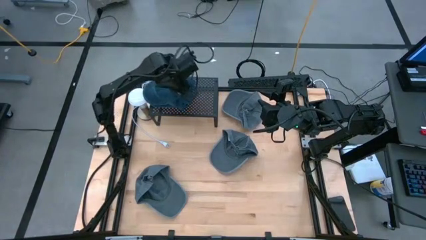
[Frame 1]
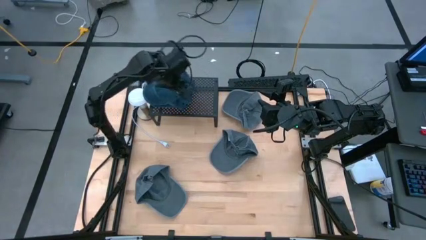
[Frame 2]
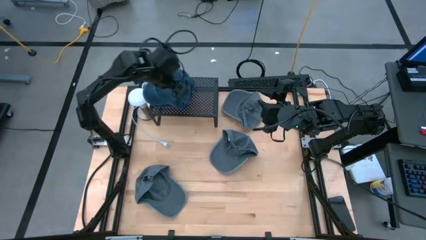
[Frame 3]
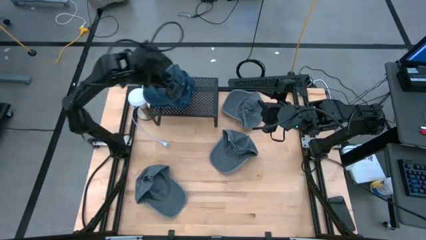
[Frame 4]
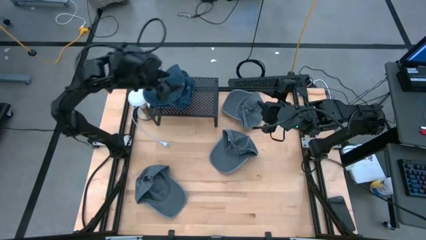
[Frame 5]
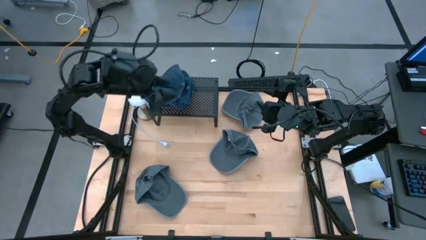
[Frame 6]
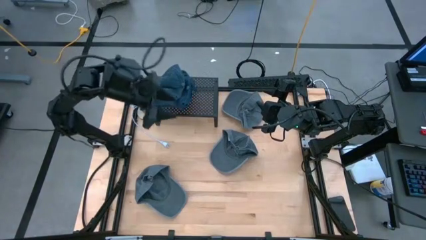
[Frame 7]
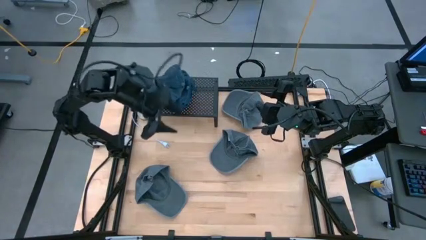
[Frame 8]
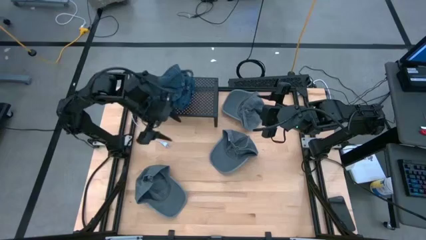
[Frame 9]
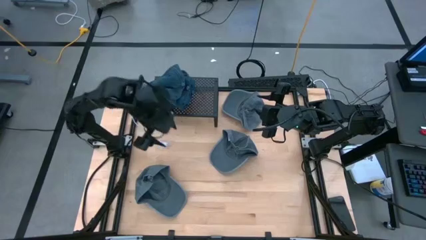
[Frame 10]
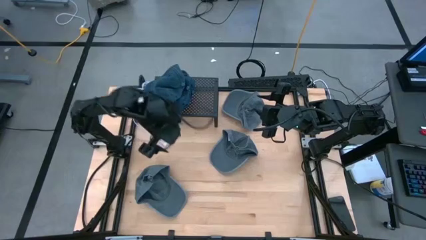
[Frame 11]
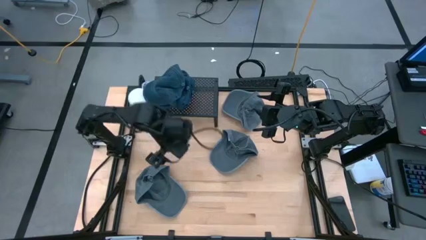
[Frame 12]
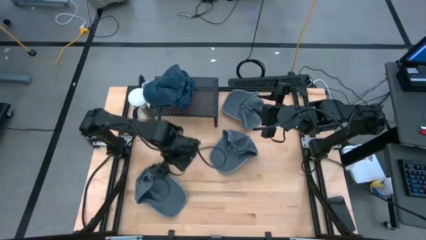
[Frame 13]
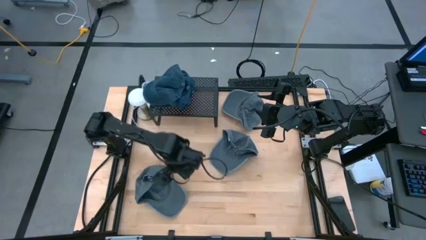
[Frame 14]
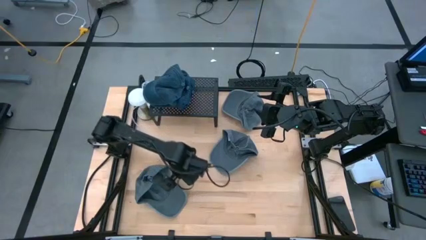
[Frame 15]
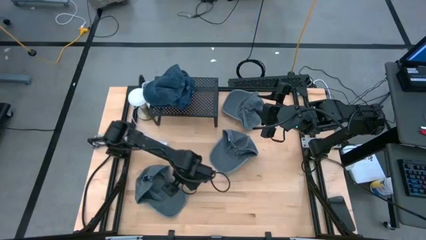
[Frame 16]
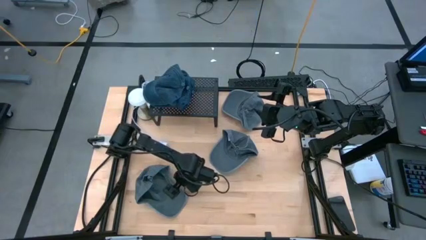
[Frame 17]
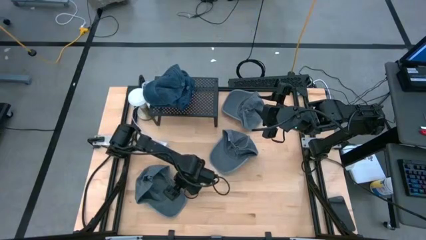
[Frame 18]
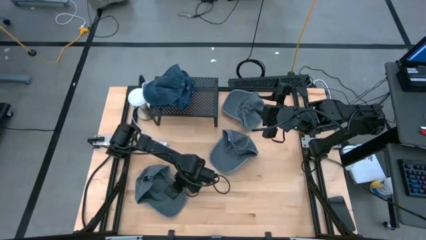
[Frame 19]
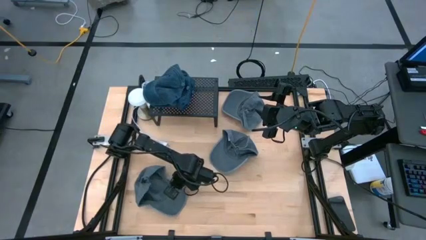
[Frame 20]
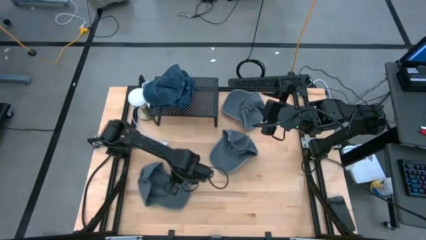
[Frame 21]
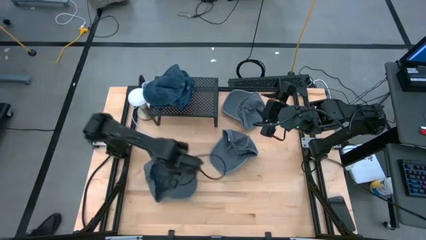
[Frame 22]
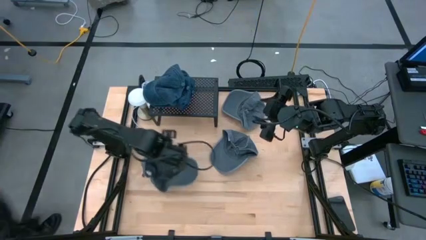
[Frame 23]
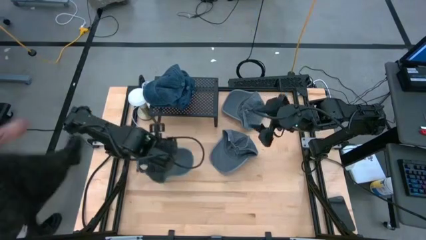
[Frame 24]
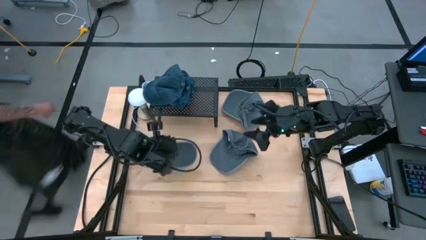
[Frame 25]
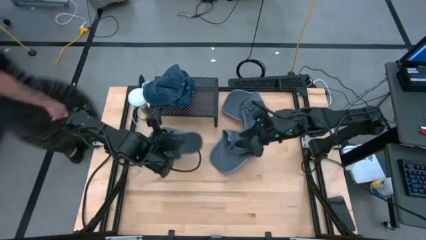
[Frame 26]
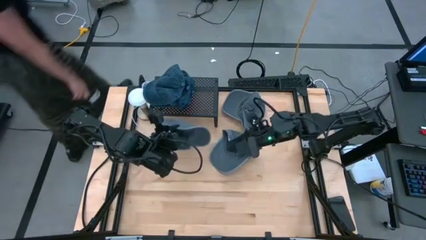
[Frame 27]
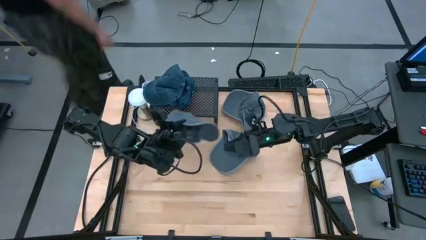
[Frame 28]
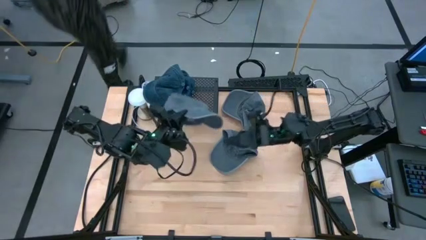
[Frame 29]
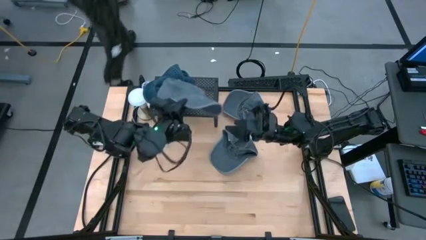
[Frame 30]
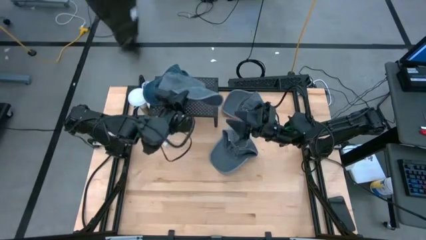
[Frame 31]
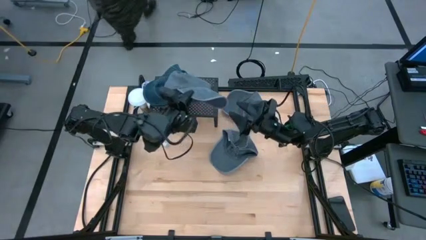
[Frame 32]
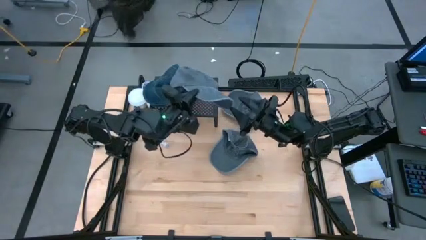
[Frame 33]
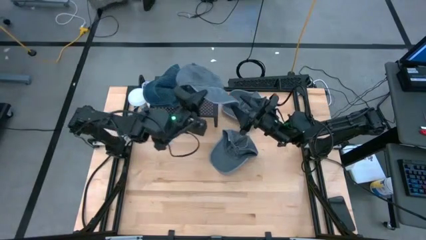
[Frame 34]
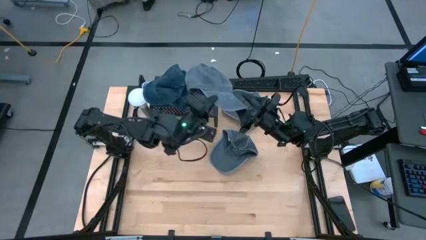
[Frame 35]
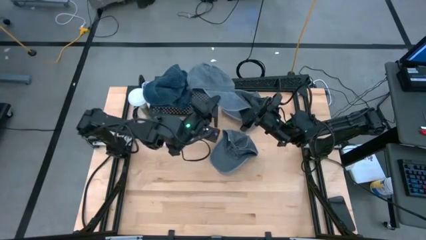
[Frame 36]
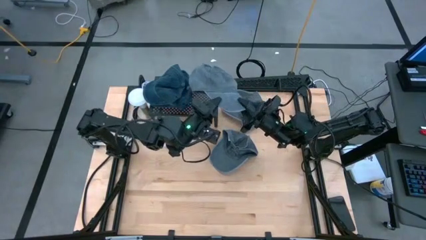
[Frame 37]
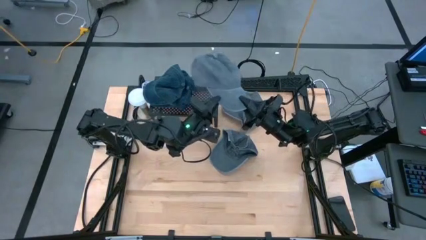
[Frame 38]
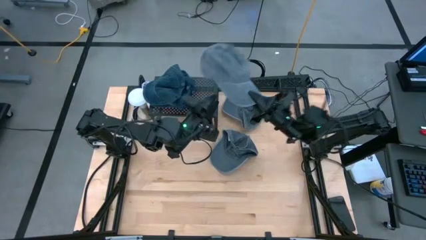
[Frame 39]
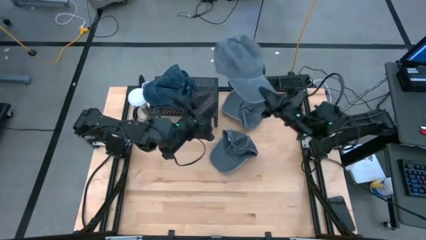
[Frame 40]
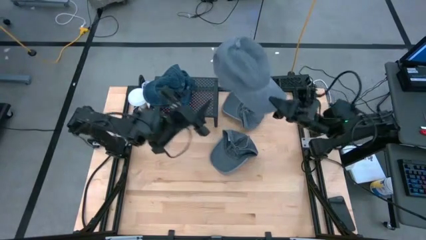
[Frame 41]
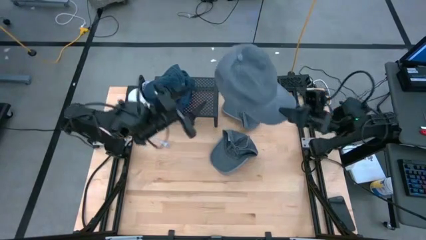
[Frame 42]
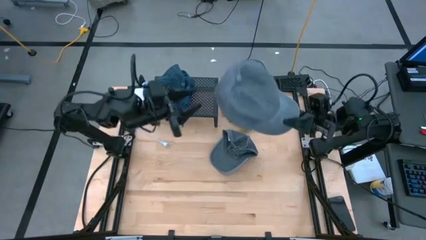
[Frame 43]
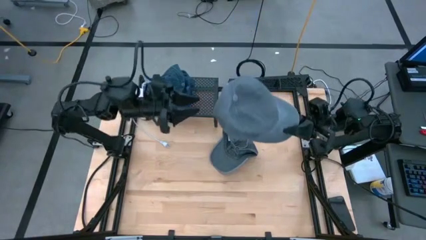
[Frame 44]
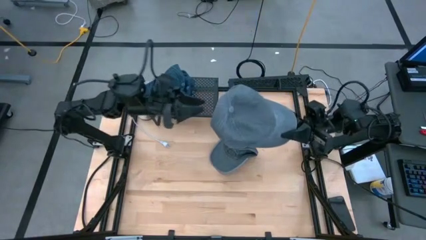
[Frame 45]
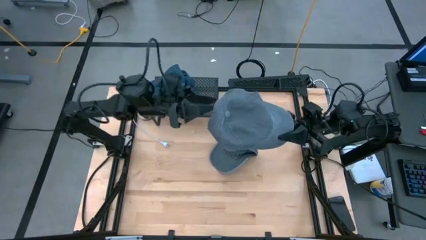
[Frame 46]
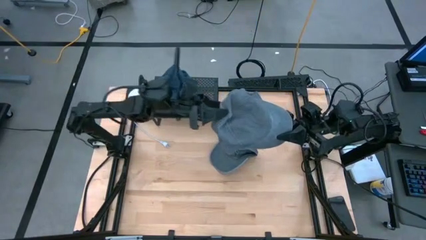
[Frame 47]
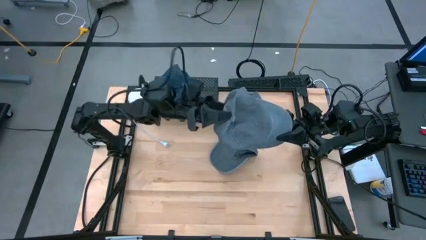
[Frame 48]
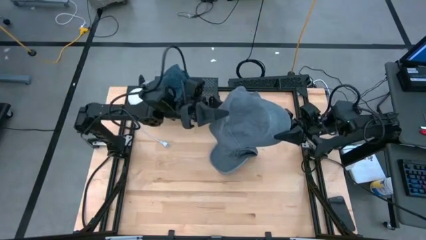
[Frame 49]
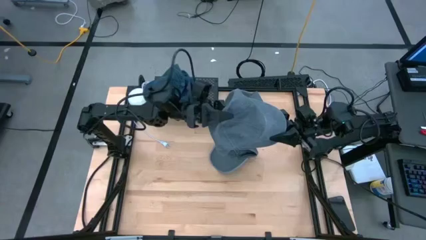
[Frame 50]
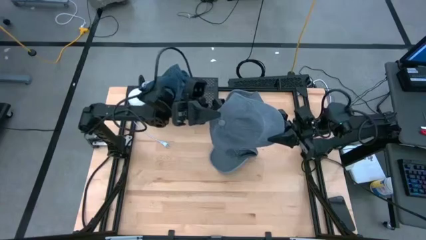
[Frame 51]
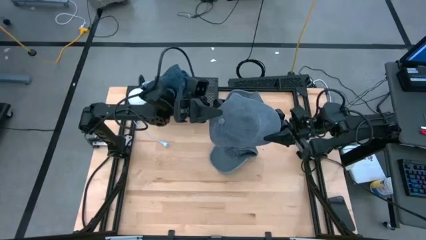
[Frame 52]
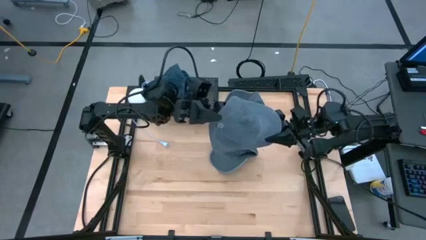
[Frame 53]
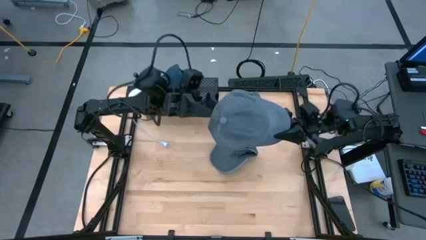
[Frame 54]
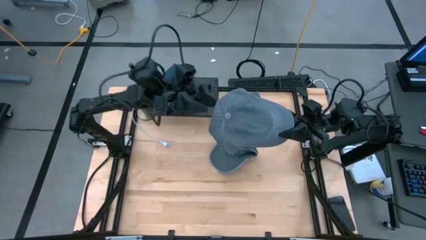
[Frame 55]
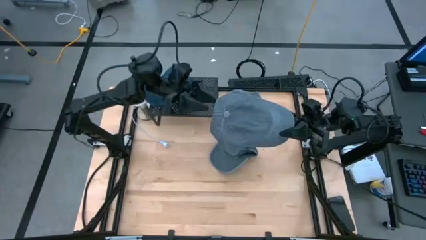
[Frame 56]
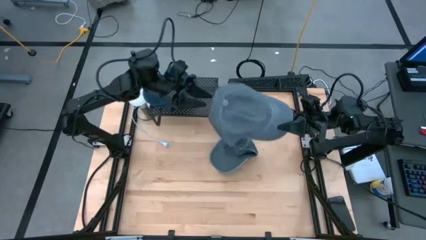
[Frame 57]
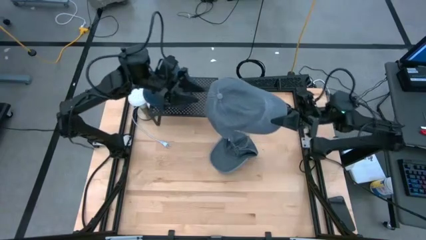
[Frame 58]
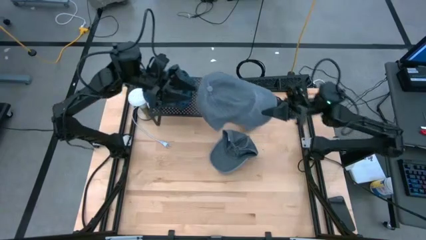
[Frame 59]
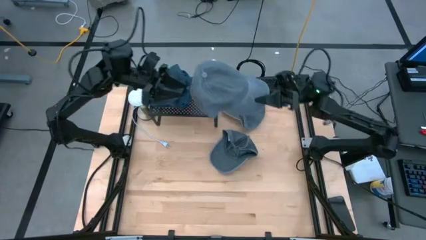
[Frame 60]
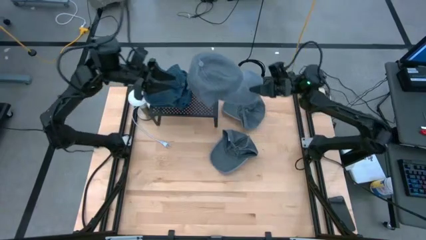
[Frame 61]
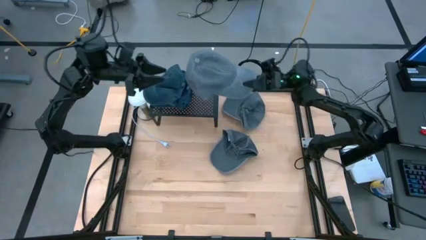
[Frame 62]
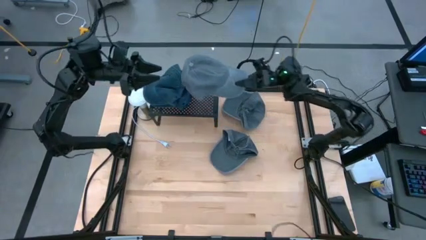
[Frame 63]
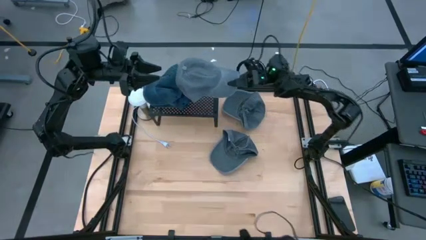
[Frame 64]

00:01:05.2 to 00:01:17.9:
Task: Pick & Place hat
Put the bottom left gray cap on the shelf
